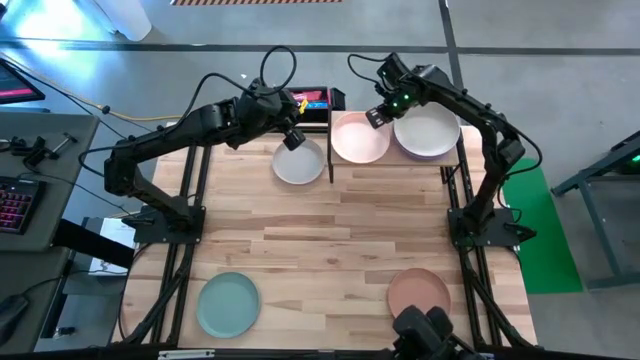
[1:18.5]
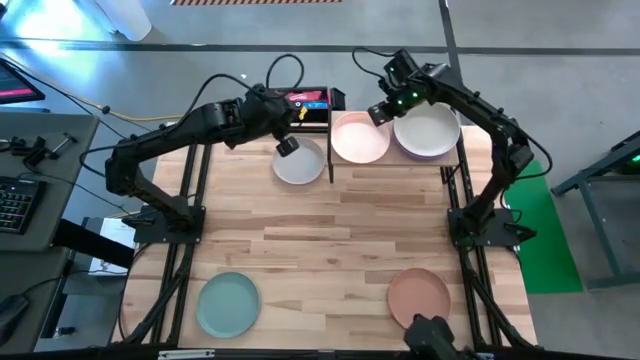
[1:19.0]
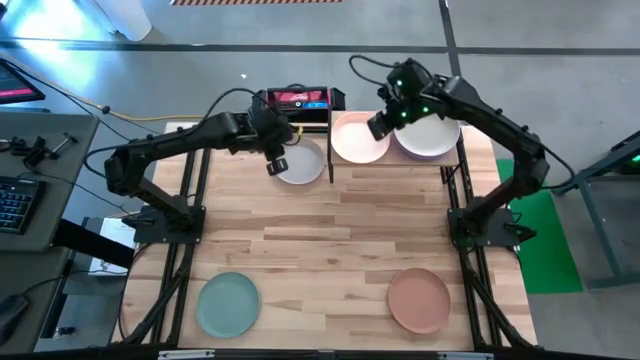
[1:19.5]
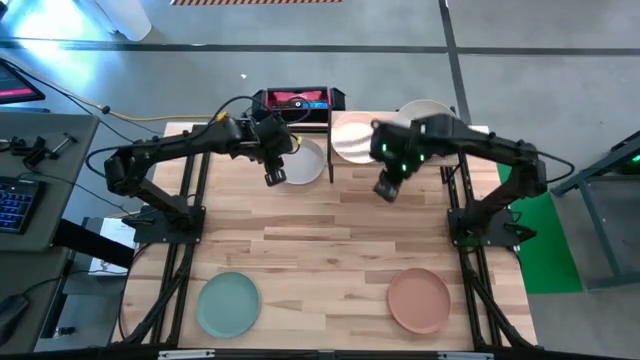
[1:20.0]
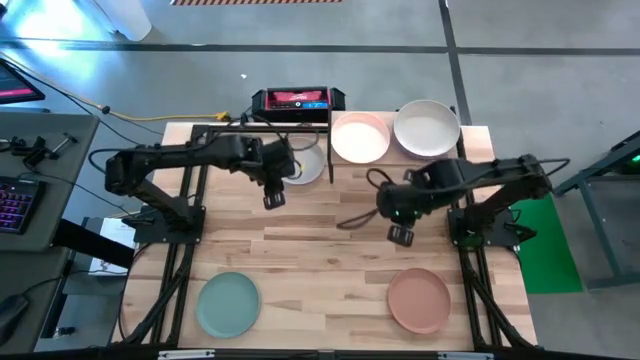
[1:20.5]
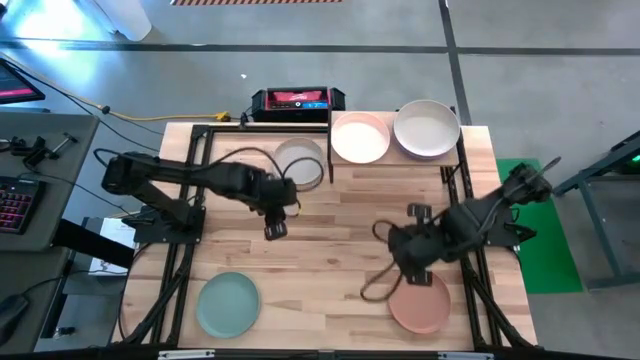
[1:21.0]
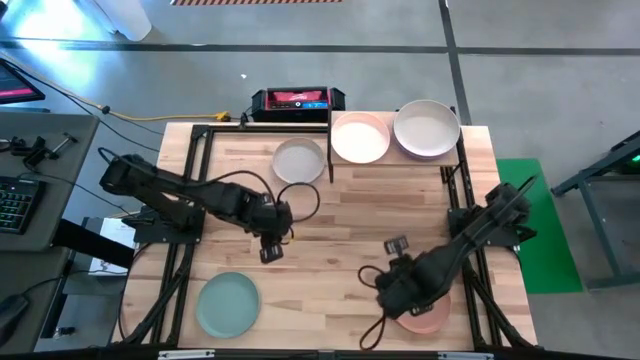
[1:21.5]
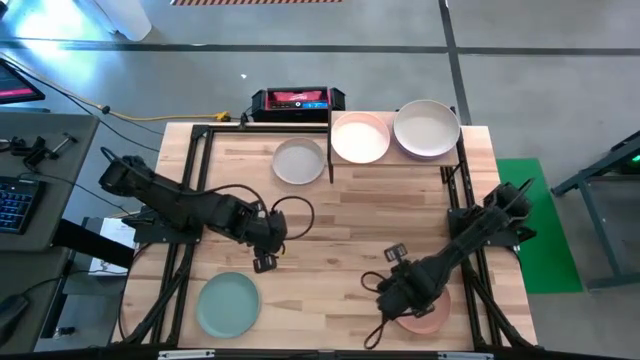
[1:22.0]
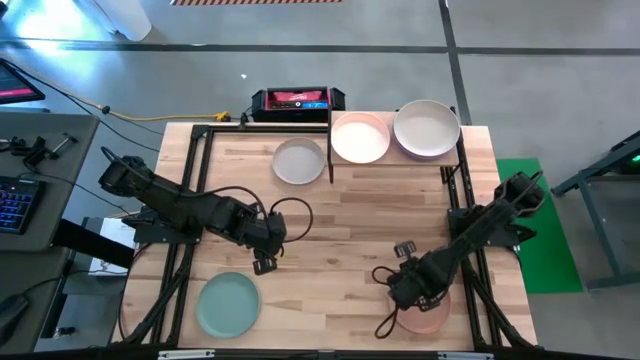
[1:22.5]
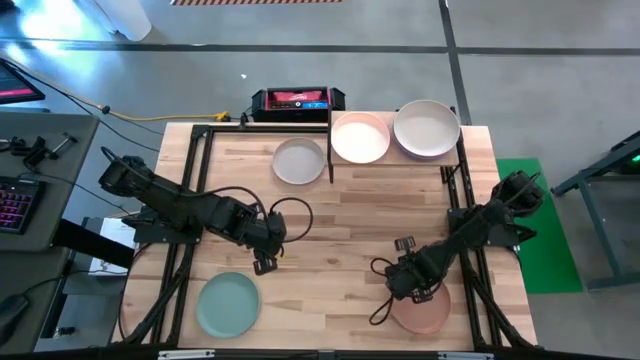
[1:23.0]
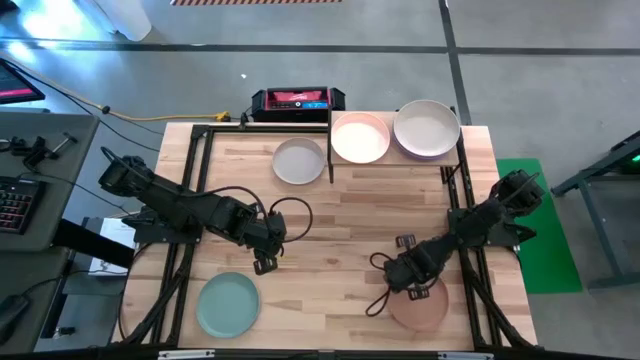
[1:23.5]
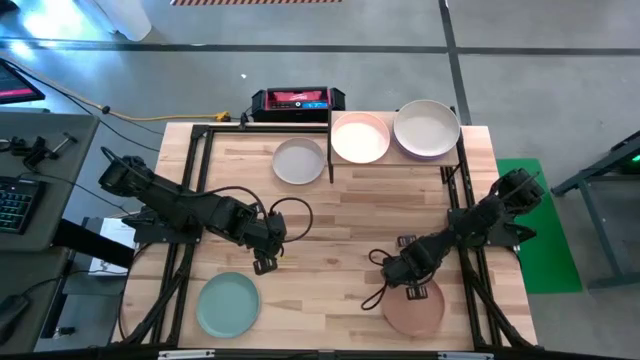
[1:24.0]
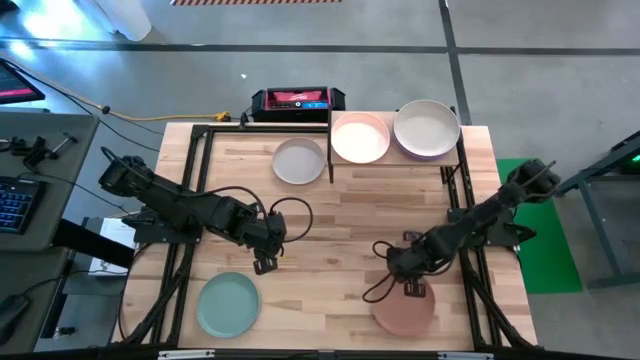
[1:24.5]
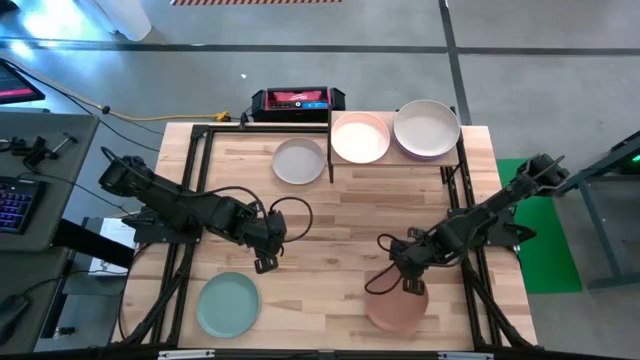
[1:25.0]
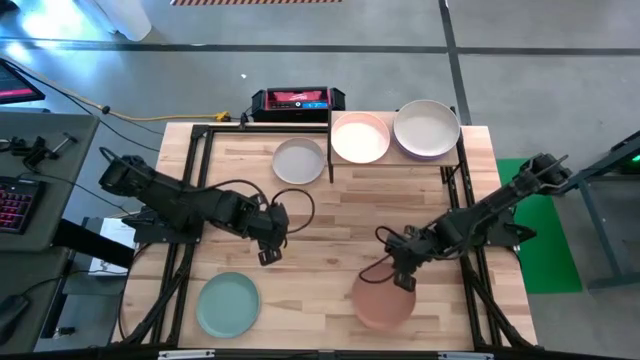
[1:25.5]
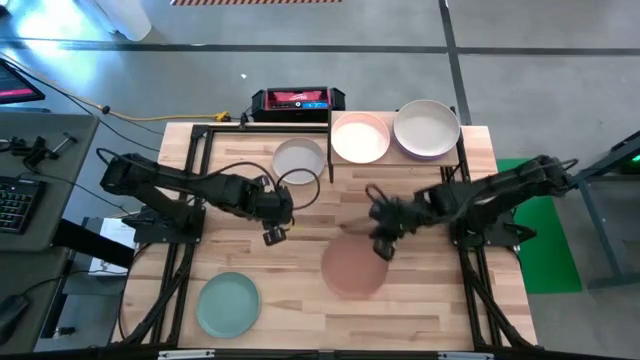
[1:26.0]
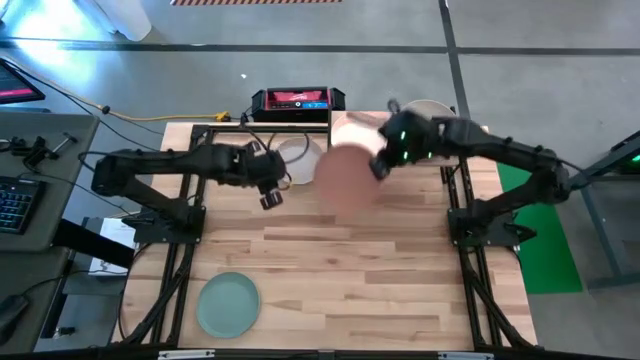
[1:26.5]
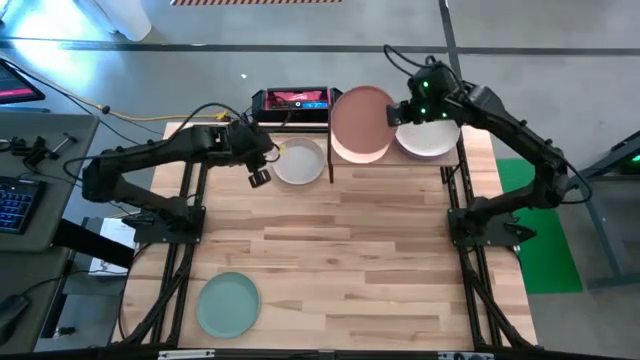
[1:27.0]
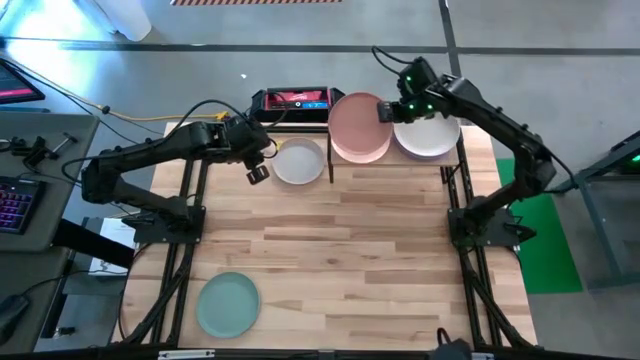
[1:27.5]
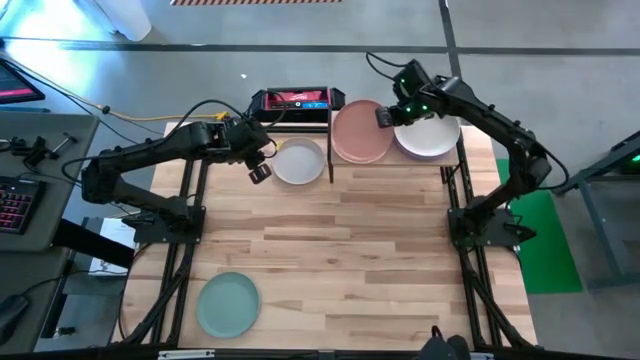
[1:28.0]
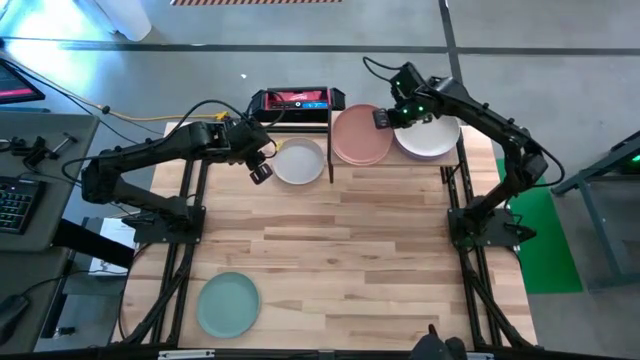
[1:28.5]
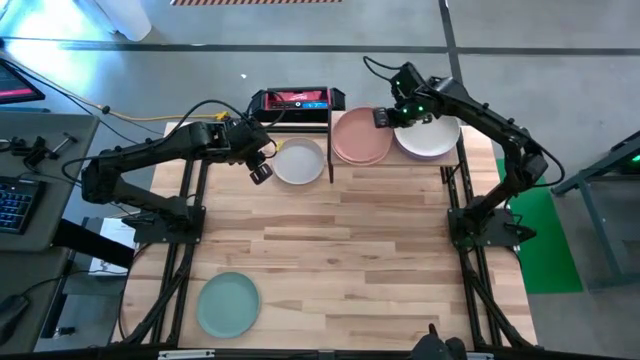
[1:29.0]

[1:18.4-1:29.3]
Task: Place and stack plates onto a shelf
Stack the orange plate on top of the peach plate on the shelf

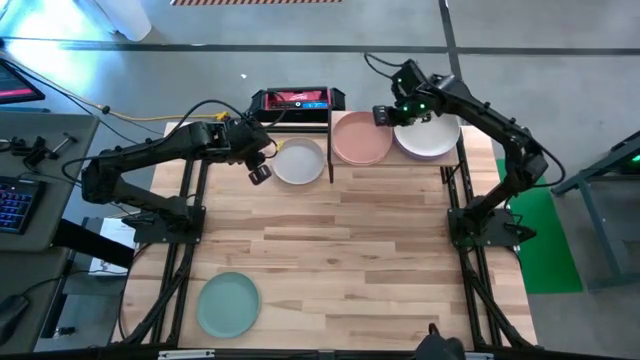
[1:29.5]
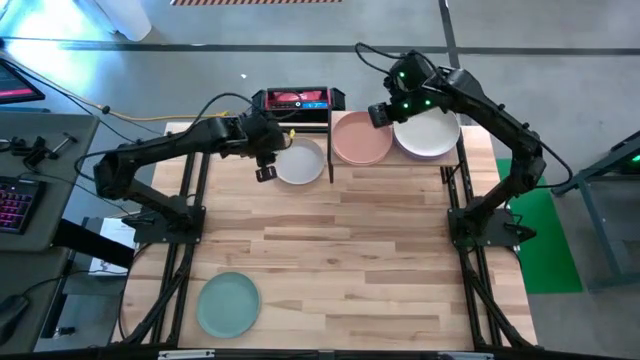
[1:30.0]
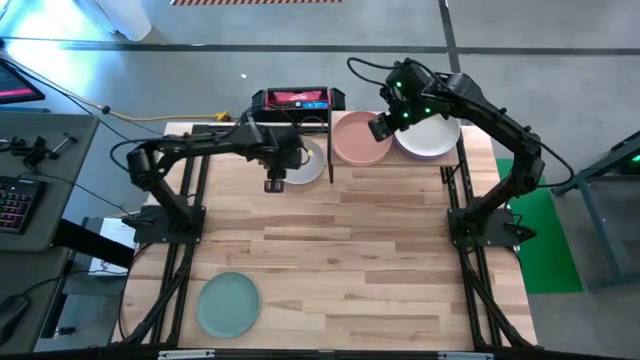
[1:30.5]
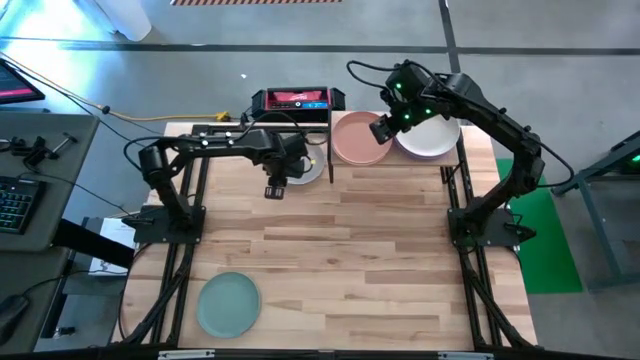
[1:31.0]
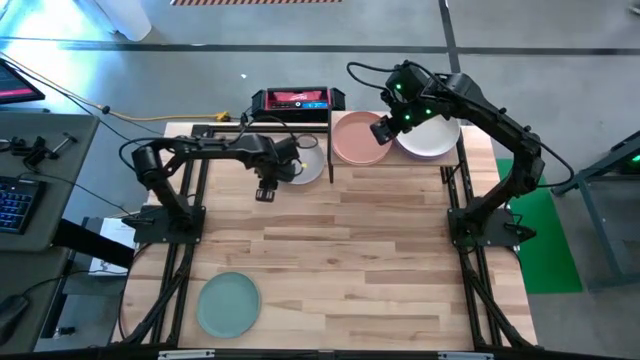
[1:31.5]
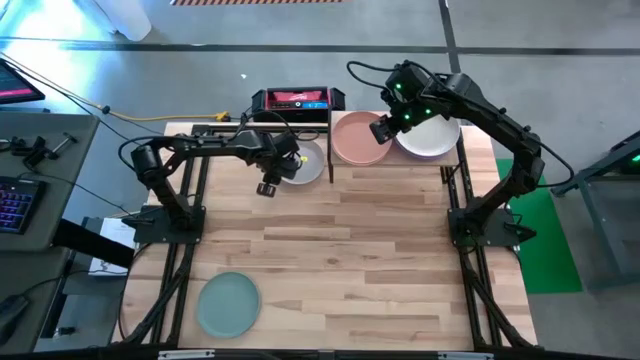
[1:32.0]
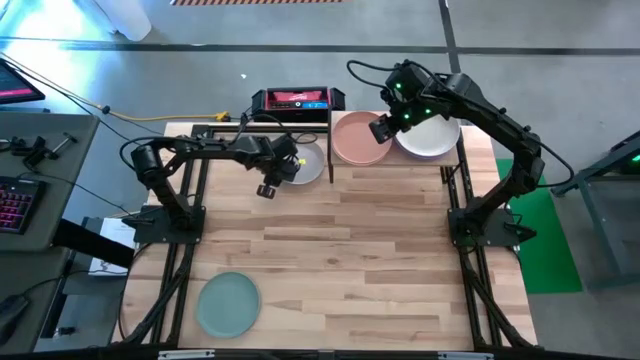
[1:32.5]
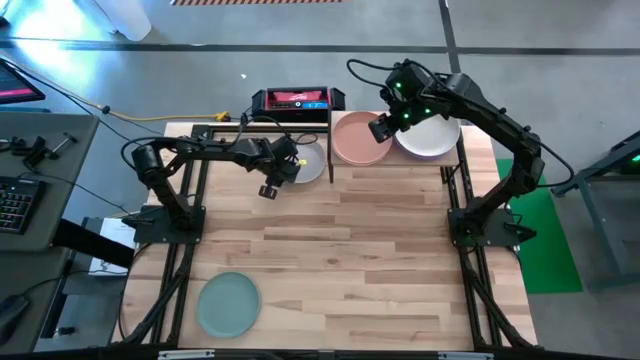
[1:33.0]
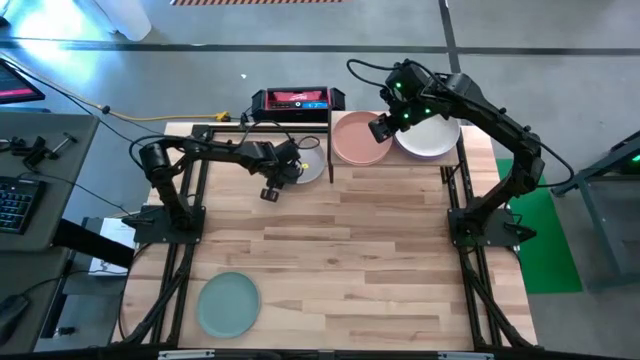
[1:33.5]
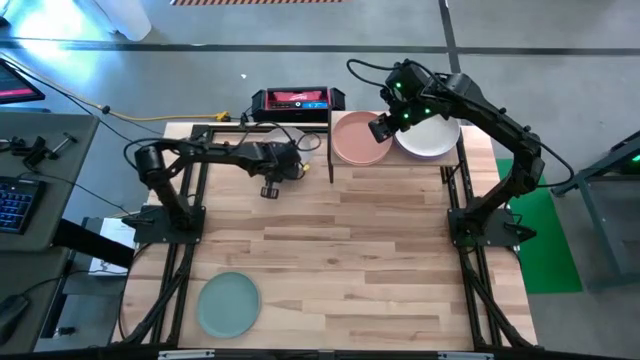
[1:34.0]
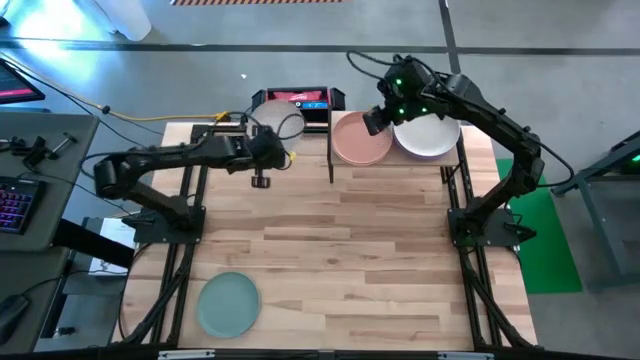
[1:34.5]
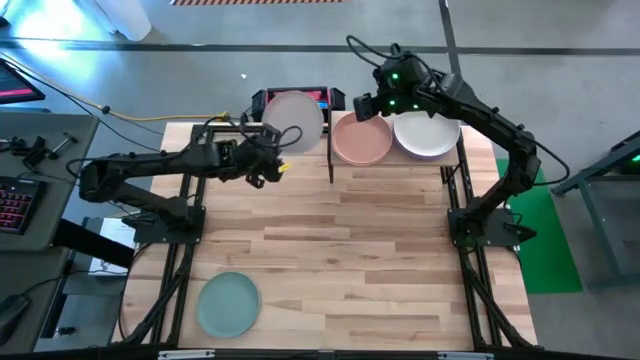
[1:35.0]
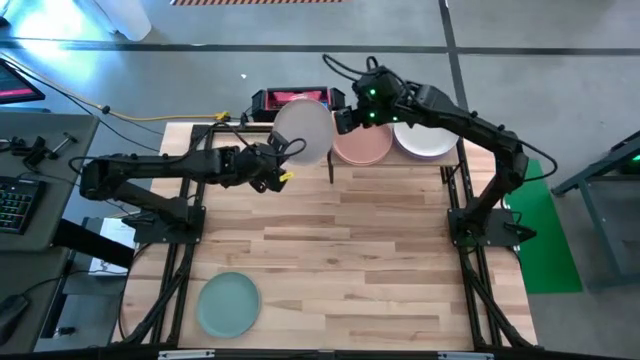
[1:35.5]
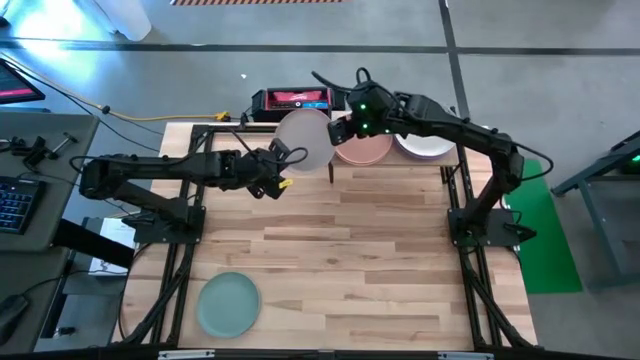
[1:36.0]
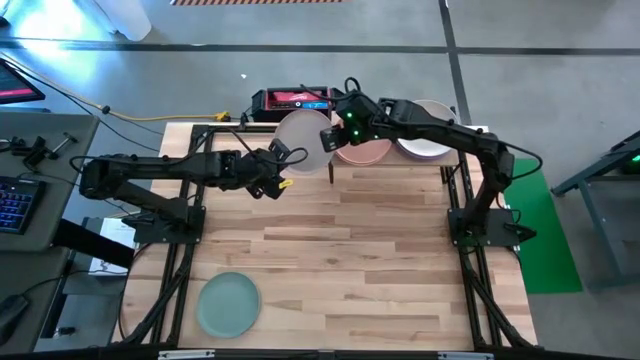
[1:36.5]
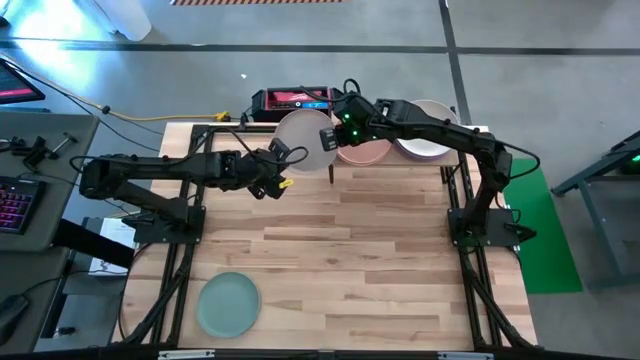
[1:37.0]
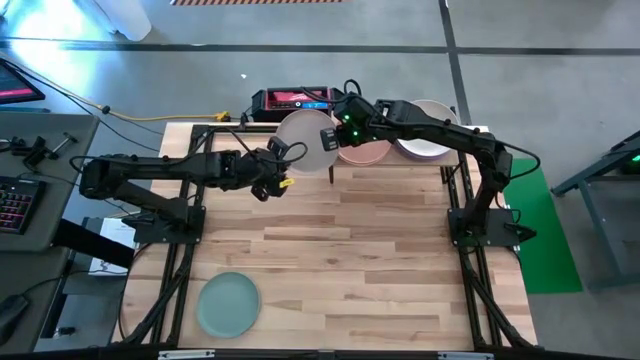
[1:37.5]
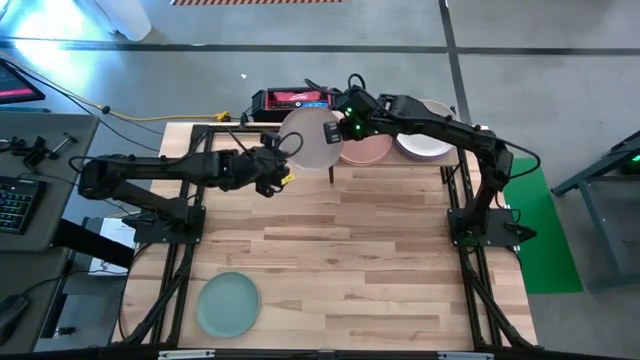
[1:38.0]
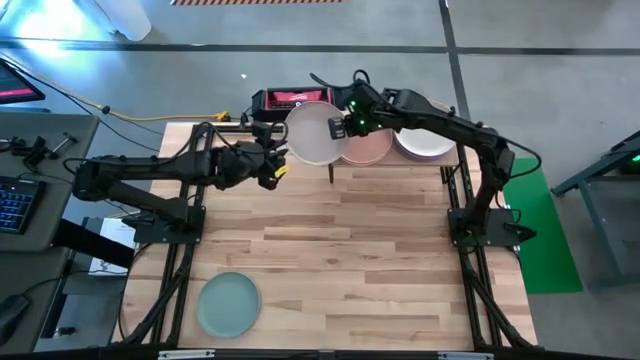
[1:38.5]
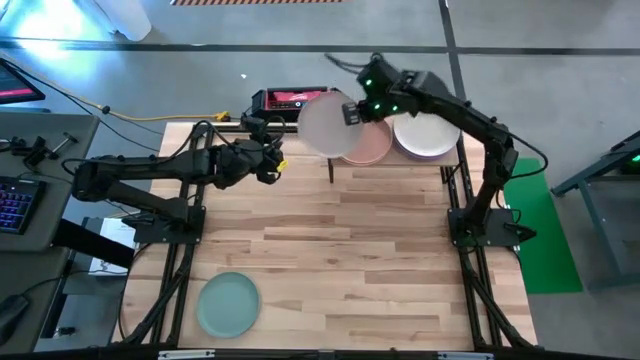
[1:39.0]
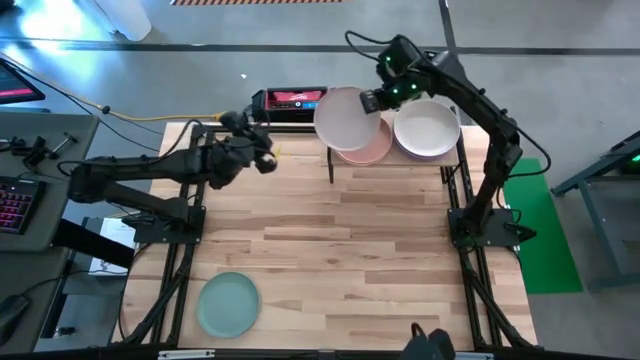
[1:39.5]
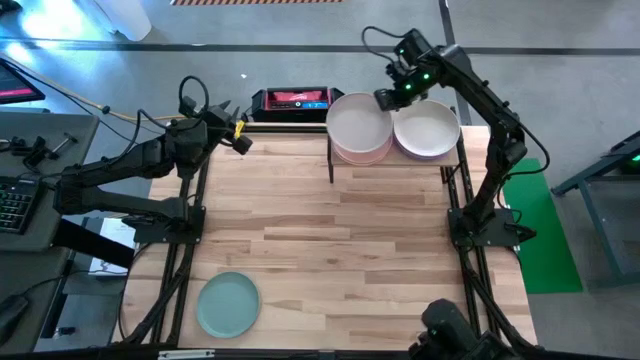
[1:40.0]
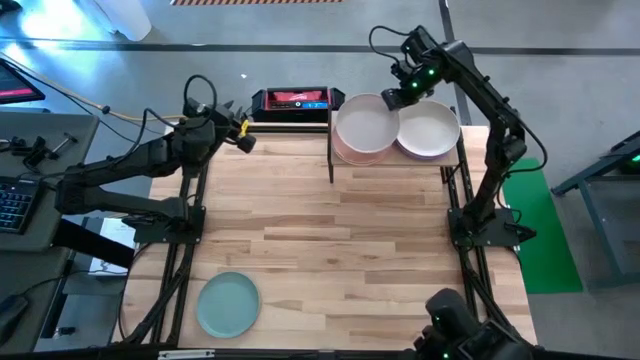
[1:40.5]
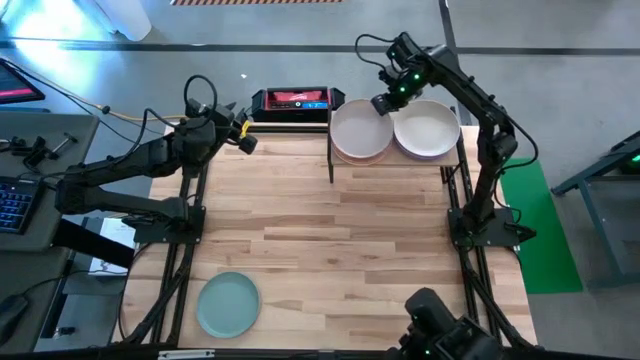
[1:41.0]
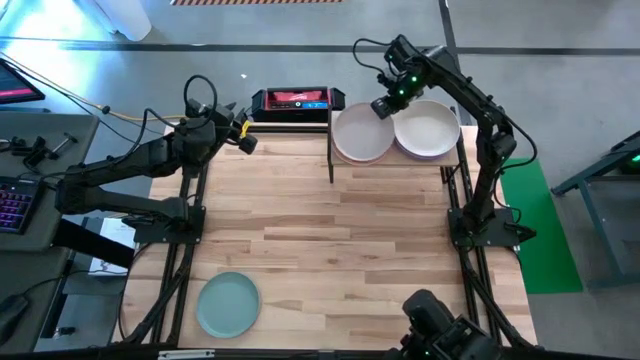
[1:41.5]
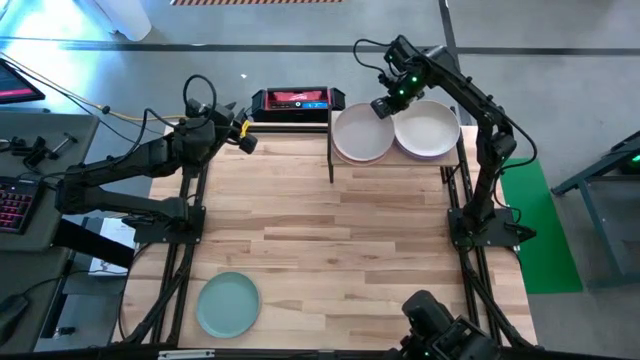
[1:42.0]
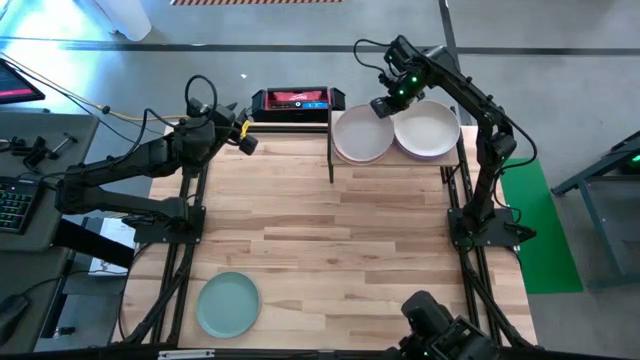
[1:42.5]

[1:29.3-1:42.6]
Stack the gray white plate on top of the orange plate on the shelf
